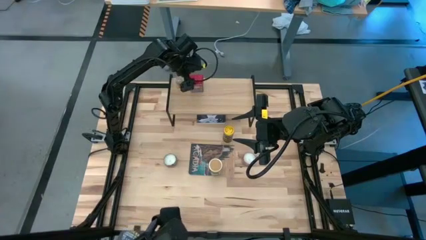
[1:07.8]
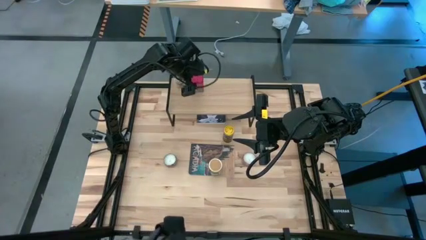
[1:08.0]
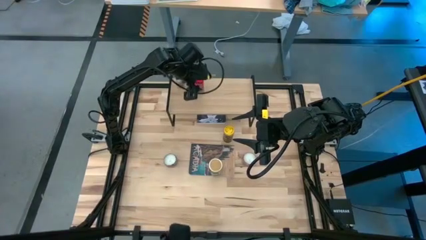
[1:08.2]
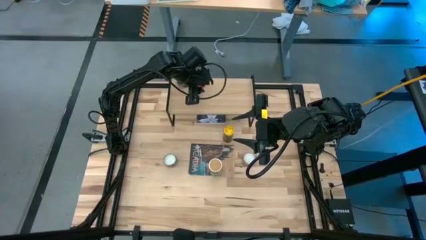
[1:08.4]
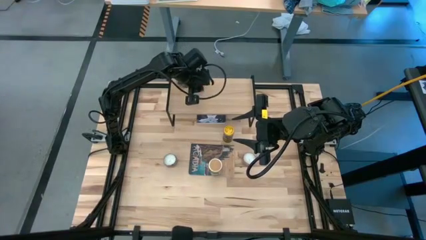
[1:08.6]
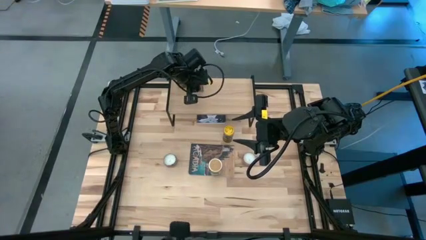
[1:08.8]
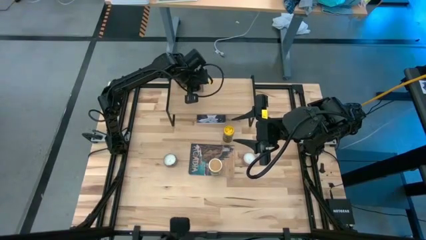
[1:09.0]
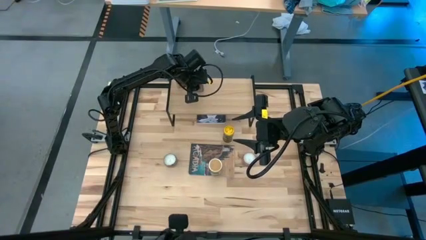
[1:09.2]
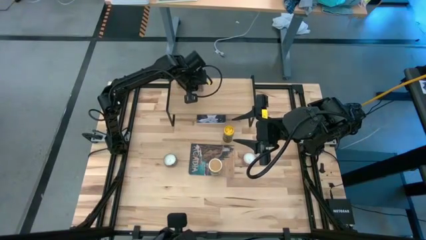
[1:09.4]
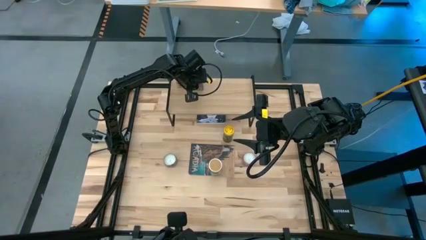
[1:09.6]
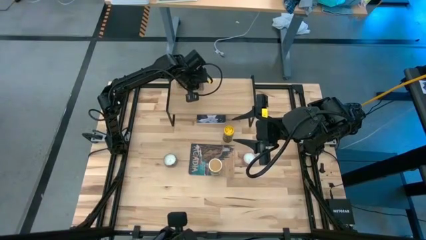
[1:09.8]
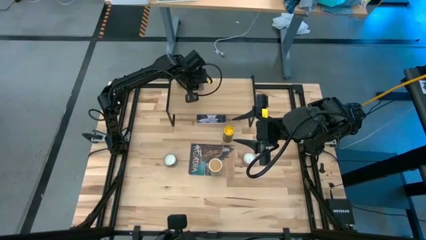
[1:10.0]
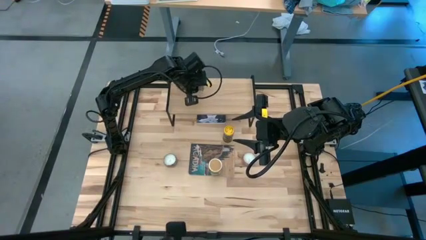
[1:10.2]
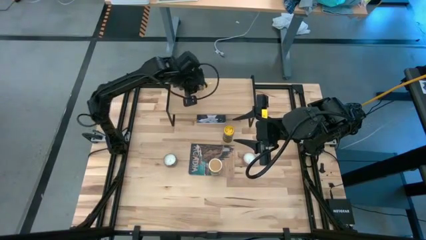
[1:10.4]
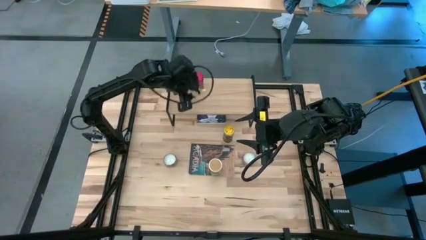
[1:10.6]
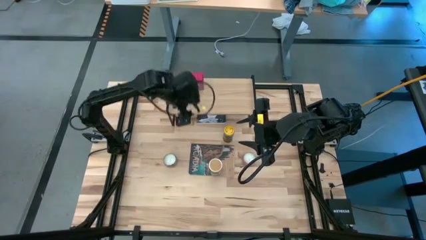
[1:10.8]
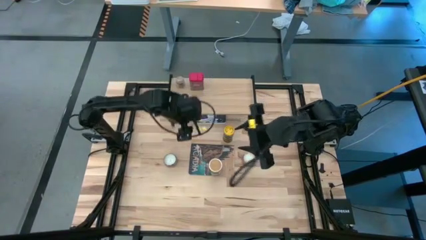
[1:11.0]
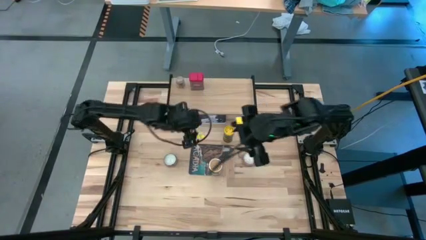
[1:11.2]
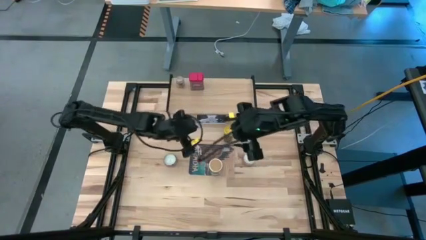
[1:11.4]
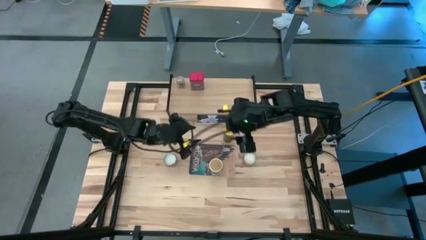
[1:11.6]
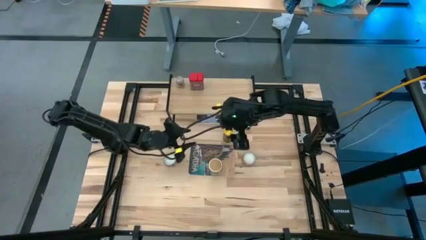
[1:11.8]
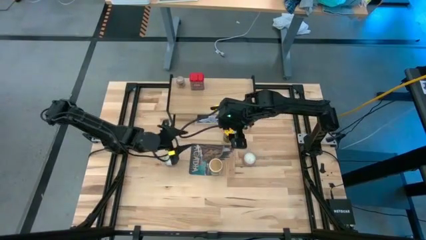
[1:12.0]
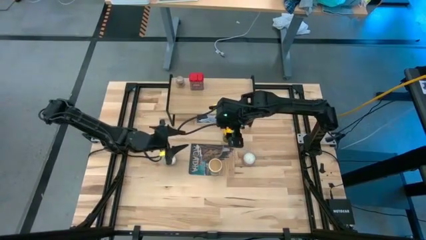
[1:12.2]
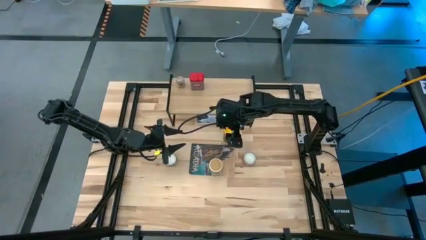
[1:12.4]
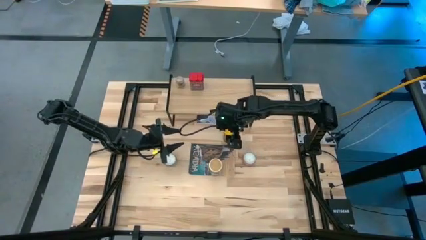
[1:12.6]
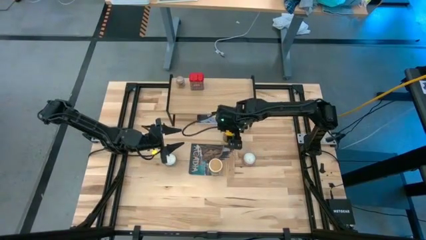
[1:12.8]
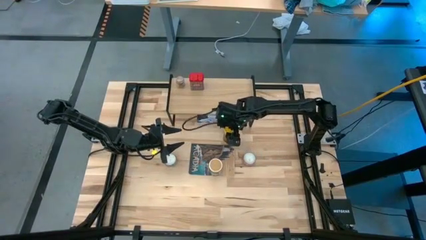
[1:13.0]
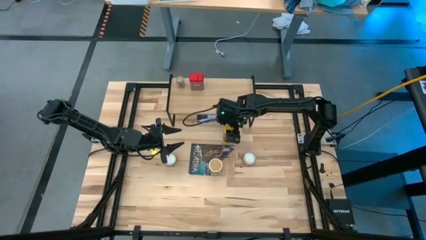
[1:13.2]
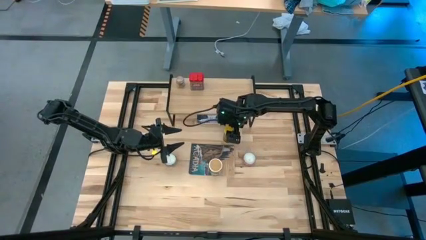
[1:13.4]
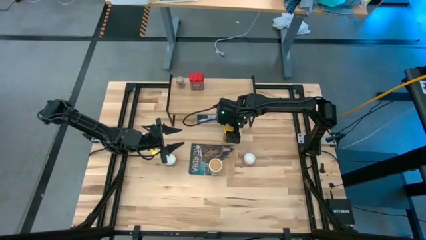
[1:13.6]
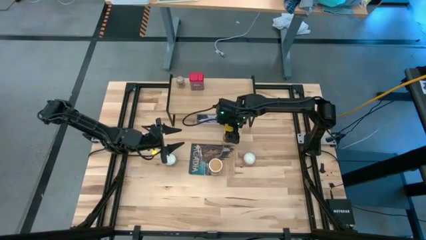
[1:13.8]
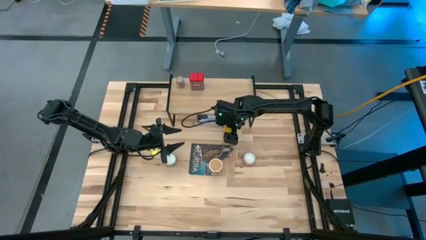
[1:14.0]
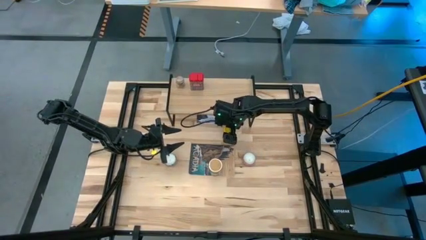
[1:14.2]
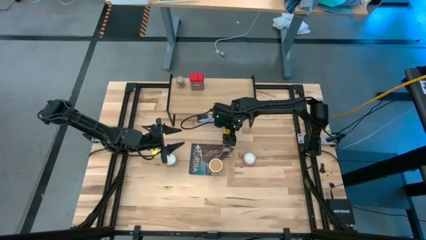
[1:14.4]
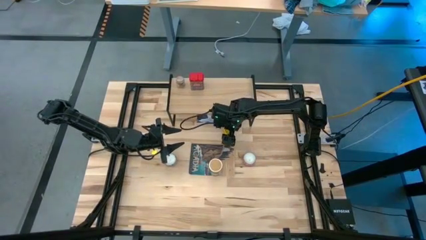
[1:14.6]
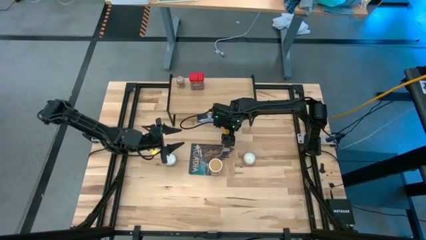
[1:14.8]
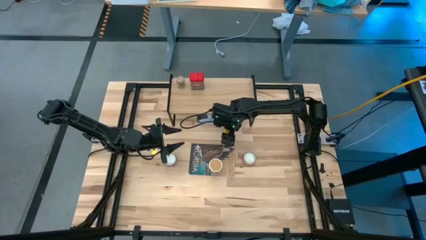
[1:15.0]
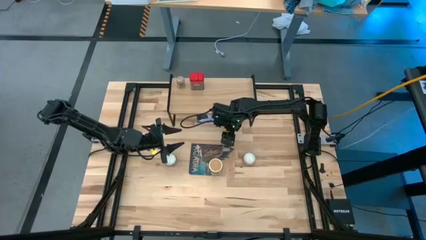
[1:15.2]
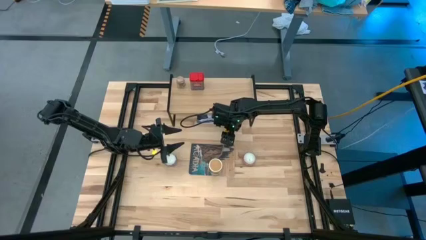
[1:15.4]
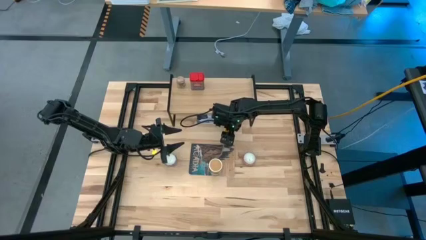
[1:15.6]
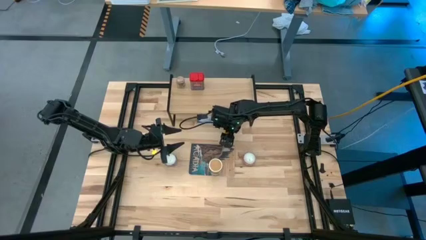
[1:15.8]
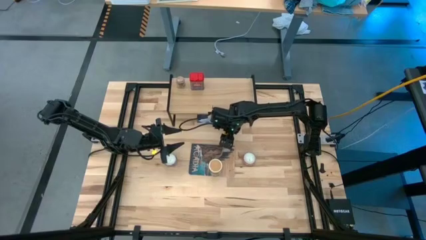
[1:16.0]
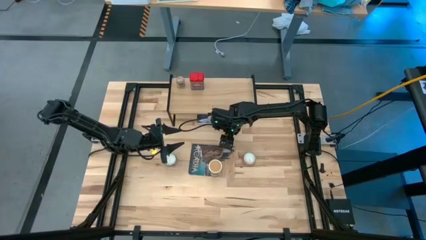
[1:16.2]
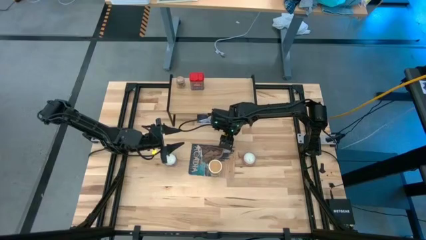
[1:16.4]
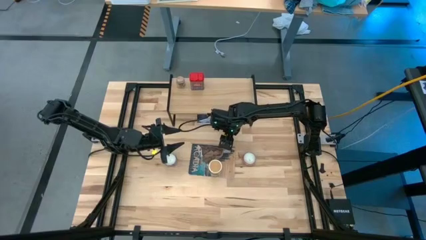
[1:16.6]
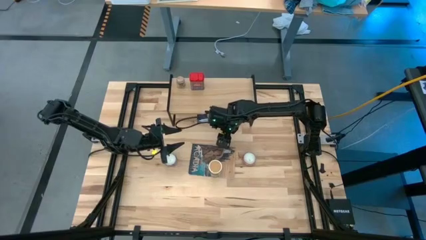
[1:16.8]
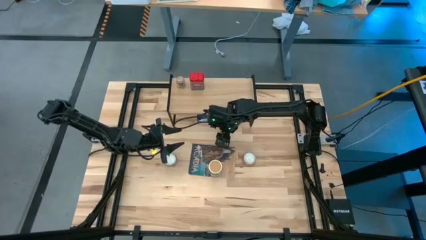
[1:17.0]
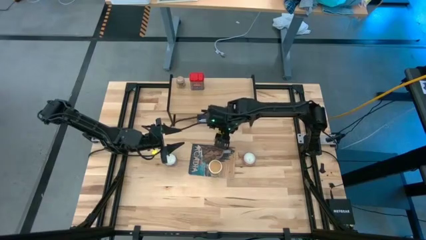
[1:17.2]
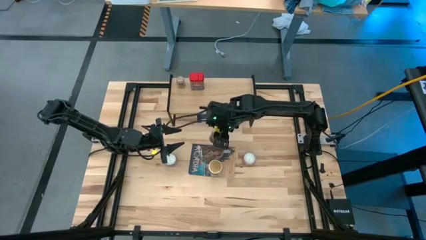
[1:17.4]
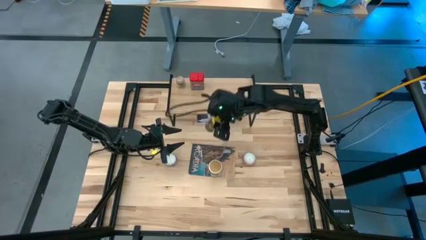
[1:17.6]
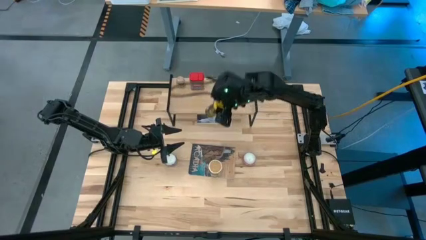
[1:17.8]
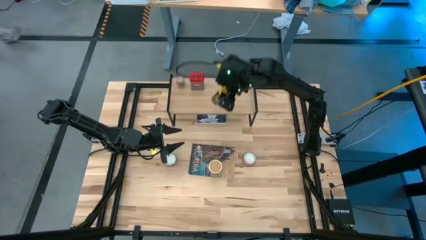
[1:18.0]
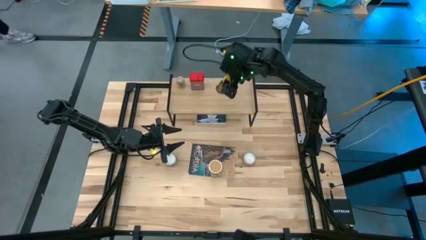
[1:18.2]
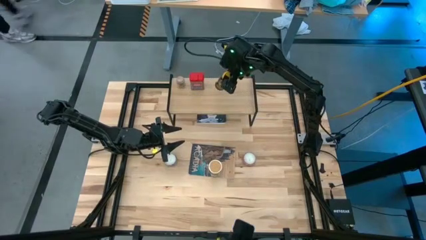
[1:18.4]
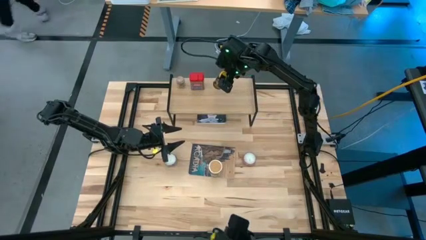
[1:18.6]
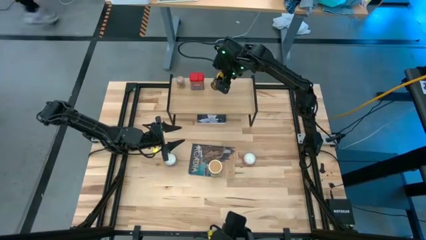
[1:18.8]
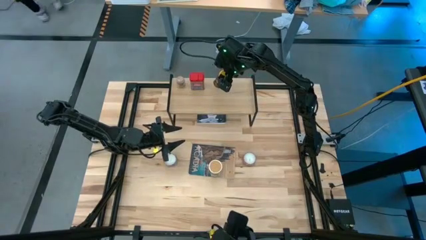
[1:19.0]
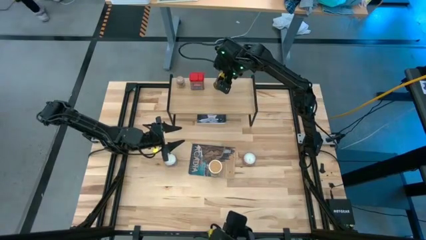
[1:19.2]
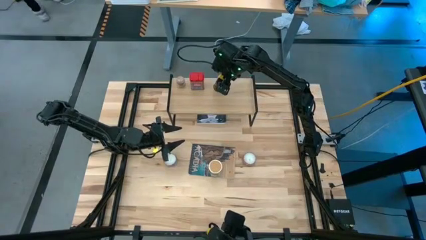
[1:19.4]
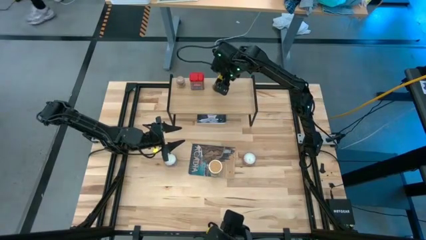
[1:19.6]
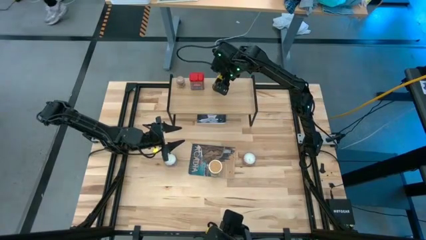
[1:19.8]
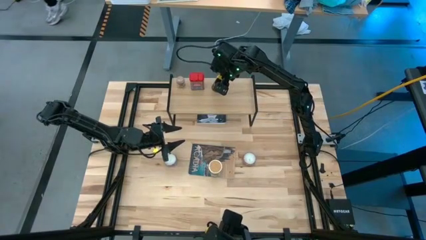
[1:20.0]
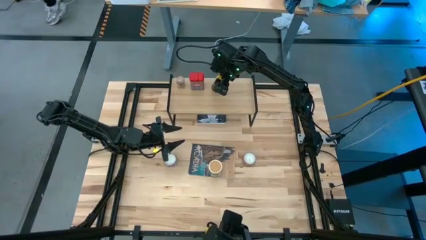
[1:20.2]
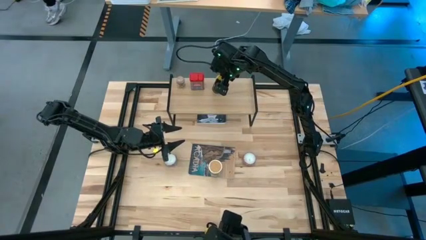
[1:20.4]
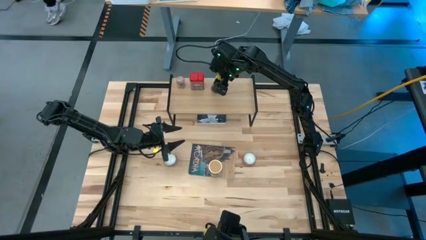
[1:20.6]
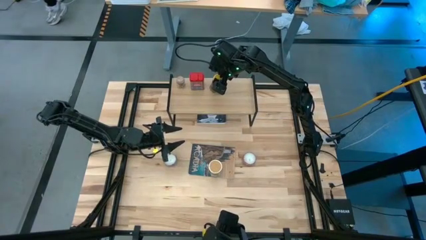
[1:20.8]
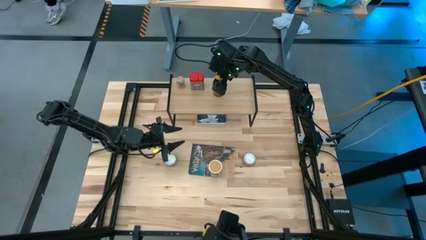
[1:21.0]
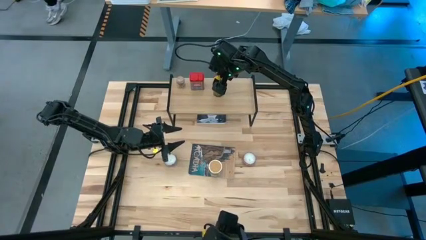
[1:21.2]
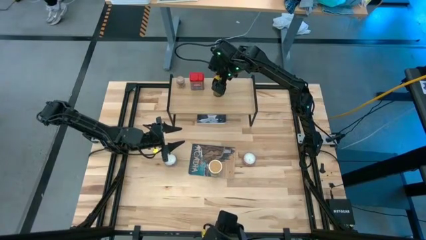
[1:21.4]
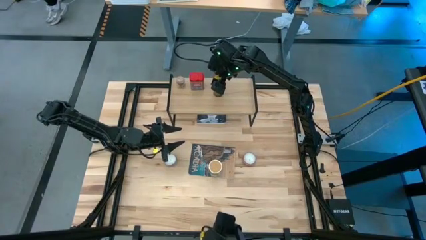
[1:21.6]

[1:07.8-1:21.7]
Task: Shelf spices
Put the yellow black seasoning bottle on the shelf
